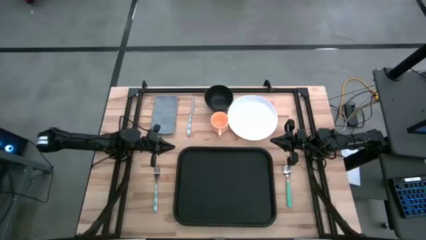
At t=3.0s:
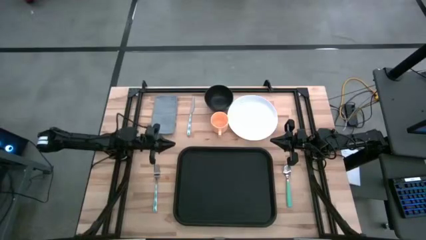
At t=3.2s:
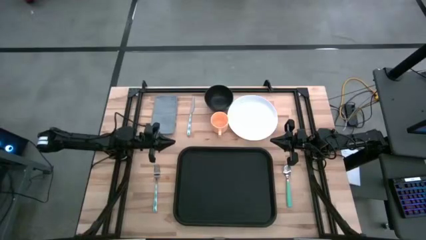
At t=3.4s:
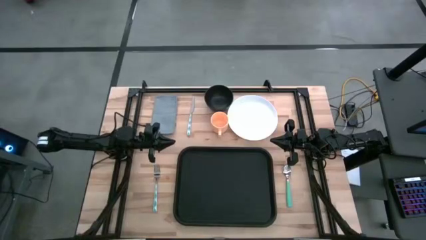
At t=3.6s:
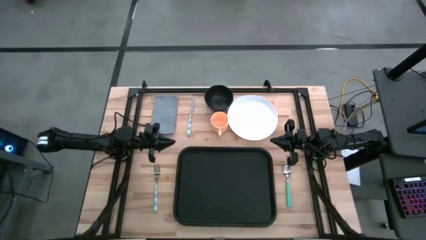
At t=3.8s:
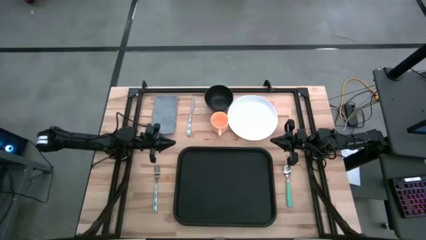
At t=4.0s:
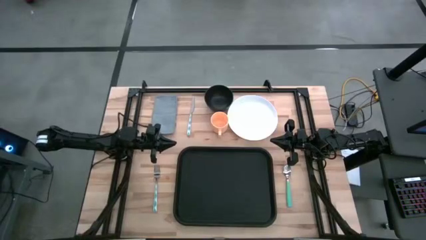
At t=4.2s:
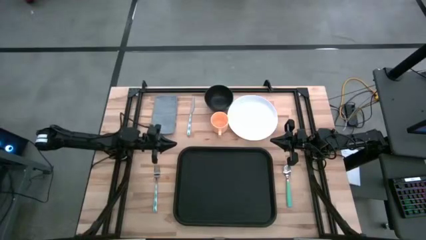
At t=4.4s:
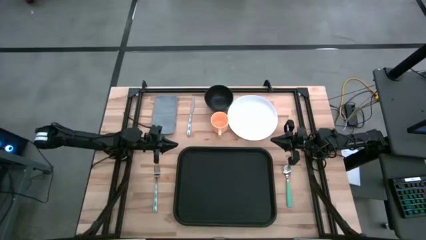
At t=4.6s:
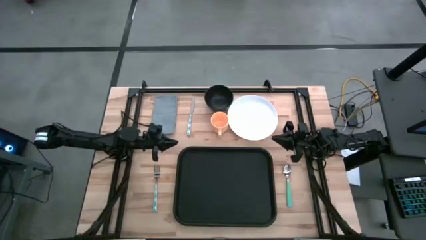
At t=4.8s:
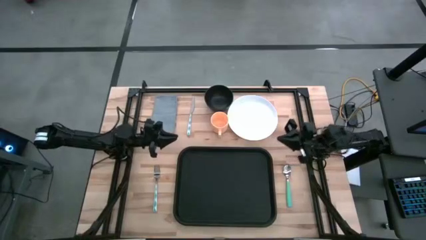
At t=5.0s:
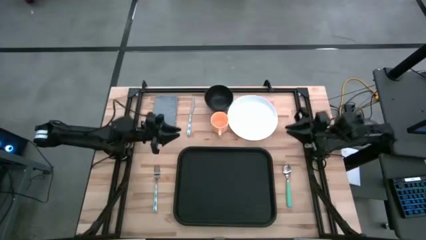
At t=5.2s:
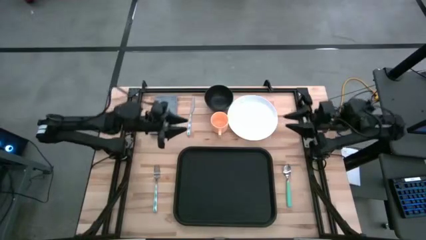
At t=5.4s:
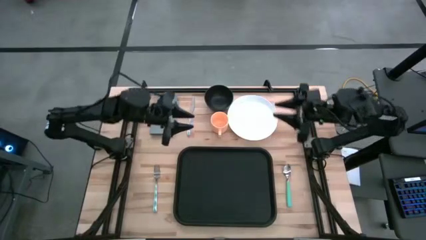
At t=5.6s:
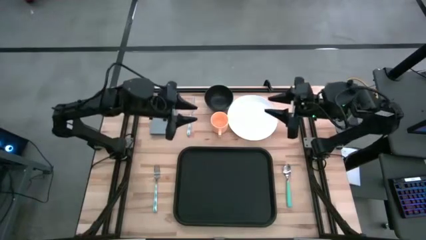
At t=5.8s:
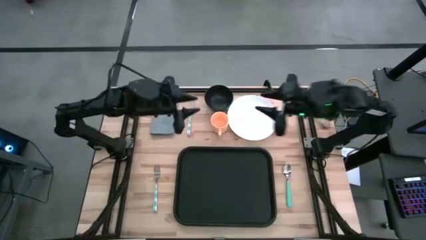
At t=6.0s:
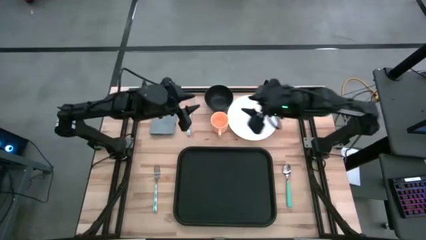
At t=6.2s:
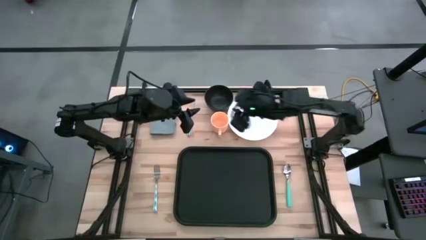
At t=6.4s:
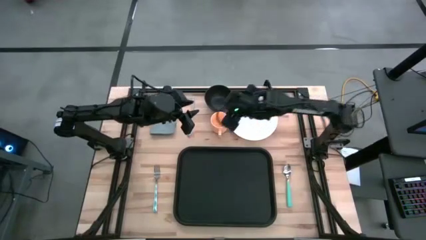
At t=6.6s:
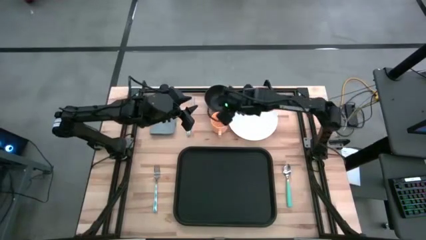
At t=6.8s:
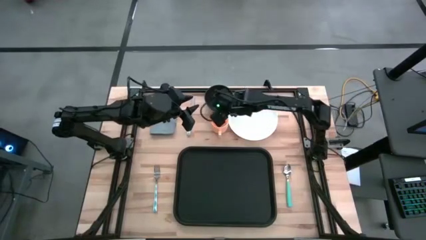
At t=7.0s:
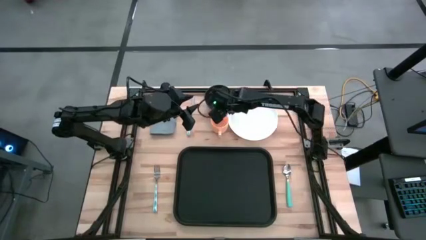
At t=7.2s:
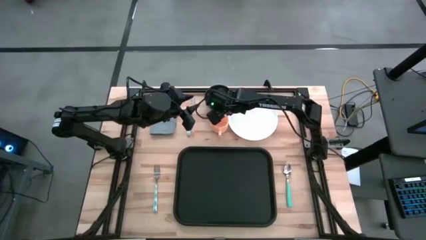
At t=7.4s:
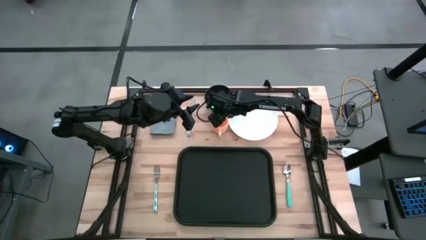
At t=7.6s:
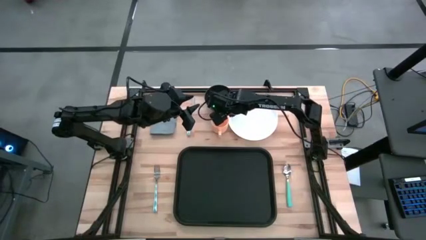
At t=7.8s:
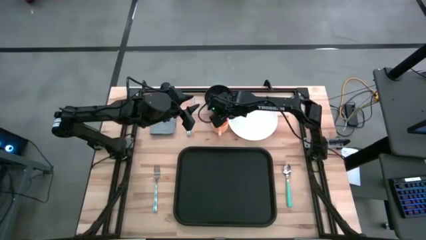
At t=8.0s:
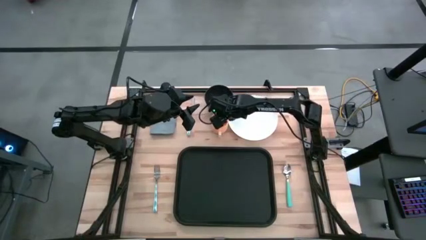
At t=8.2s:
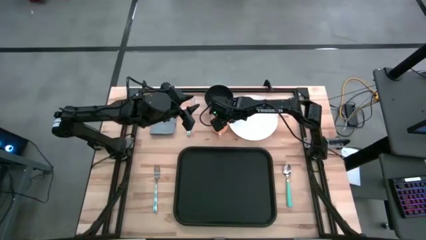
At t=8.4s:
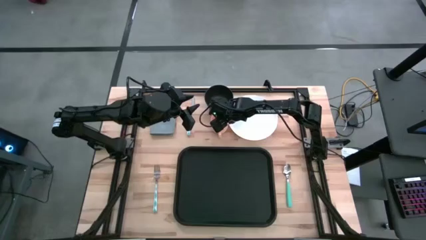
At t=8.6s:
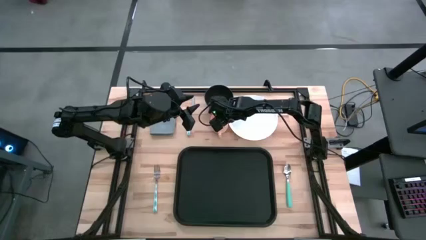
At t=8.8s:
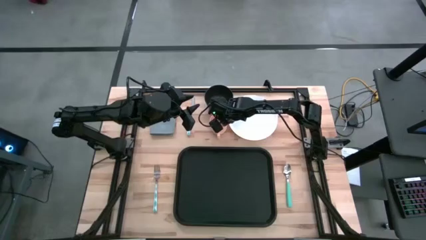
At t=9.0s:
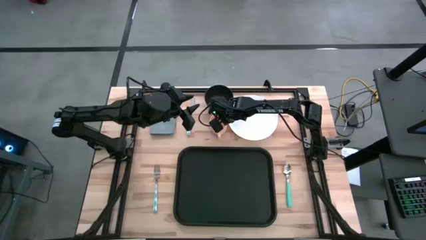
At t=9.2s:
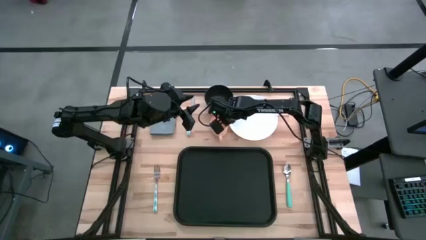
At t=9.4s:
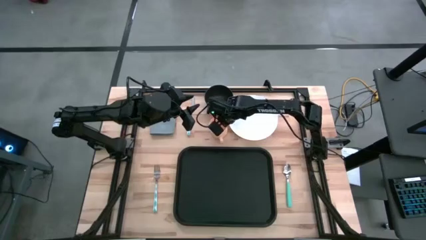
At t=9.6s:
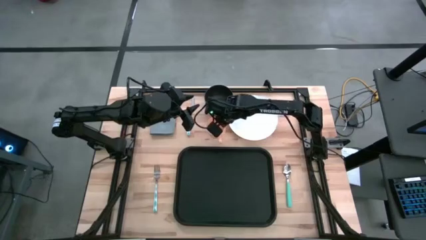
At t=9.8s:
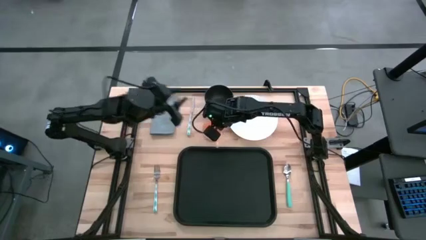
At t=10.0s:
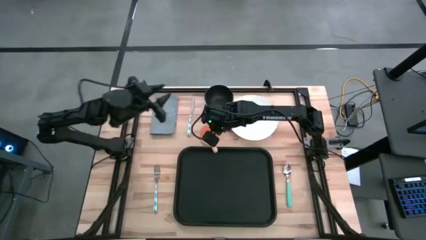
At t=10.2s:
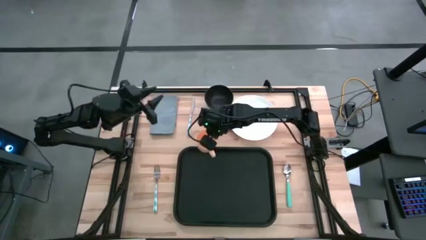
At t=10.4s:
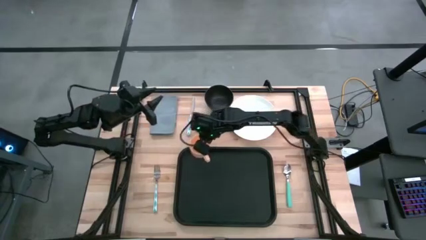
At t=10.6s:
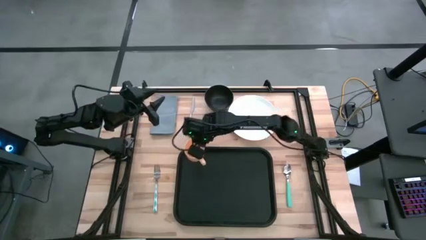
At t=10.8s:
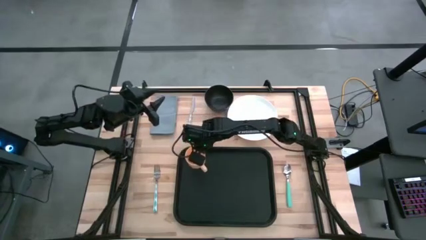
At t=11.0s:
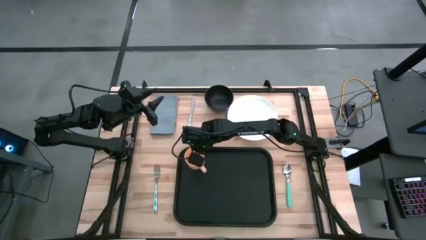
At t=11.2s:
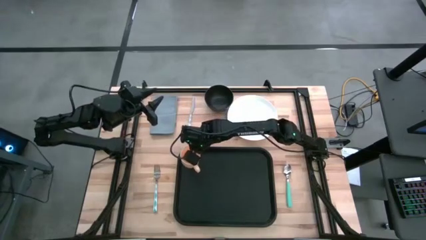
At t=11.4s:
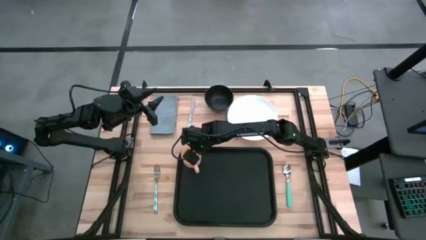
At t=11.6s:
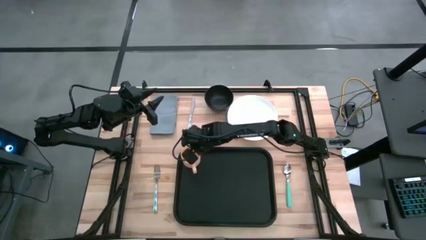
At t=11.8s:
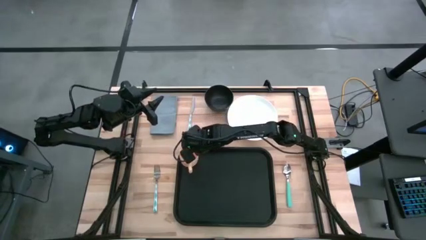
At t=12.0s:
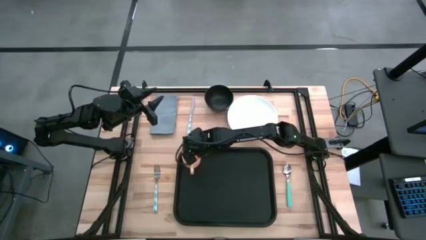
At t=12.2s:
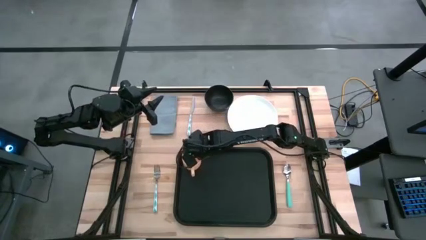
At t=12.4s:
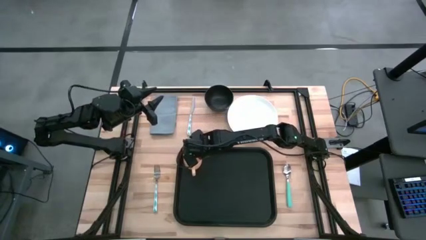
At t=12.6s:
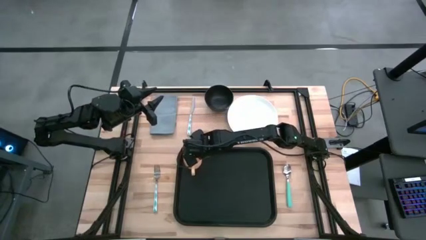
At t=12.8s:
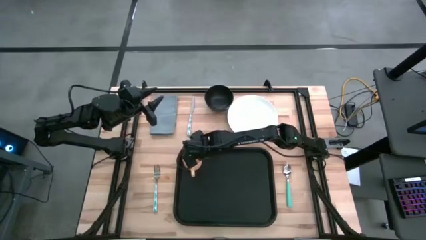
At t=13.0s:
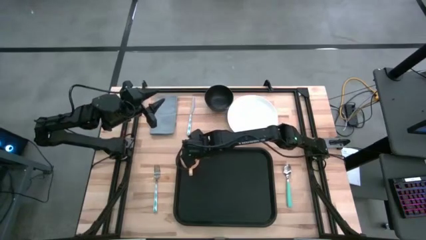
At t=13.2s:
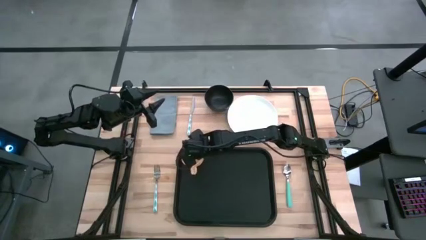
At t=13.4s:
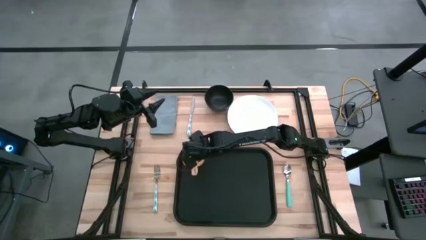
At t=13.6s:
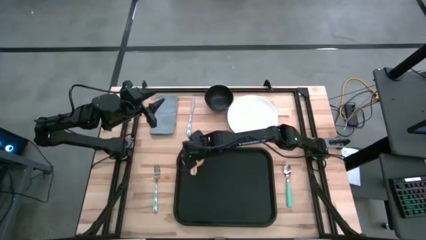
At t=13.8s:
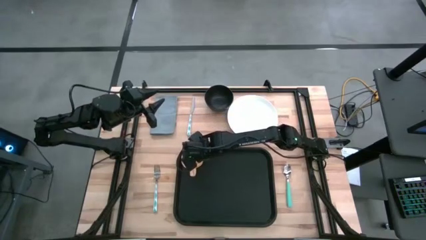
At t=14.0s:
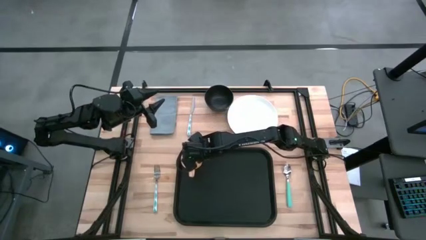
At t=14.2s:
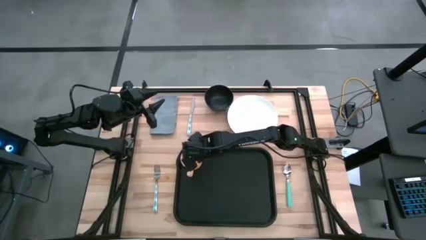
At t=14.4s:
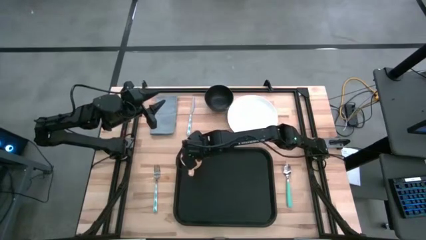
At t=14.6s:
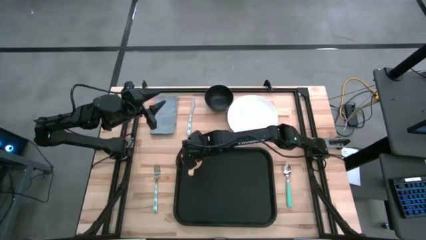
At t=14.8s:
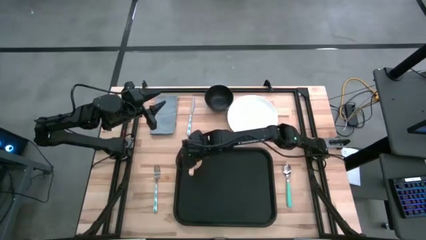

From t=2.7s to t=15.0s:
Task: Set up tray
Put the orange mug on the top left of the black serving tray
